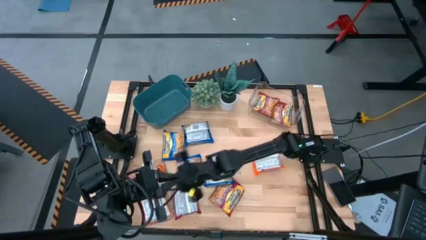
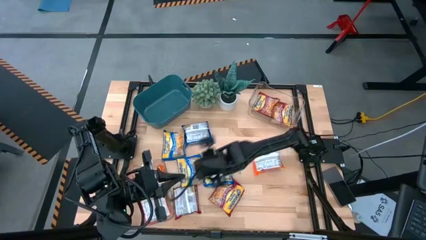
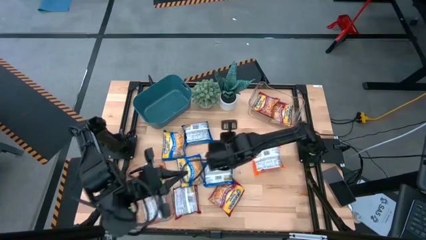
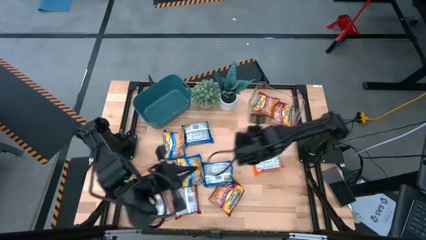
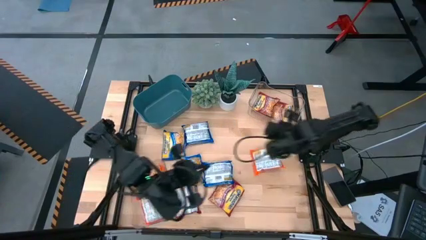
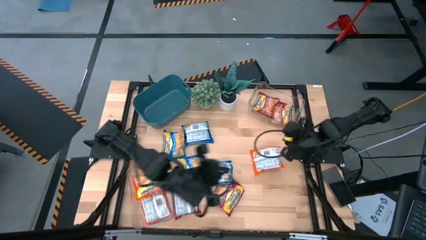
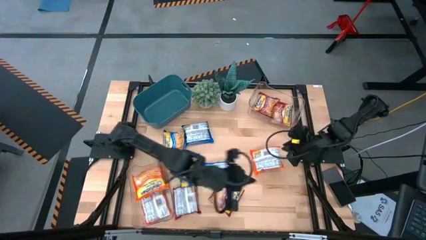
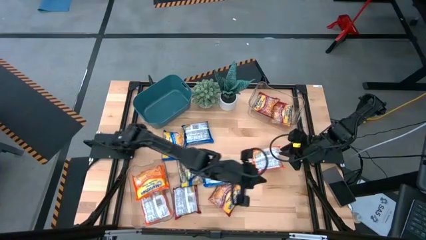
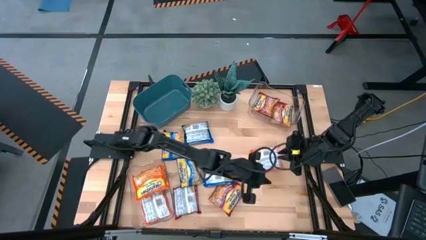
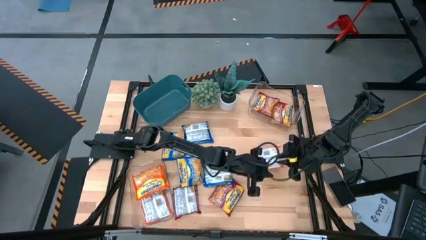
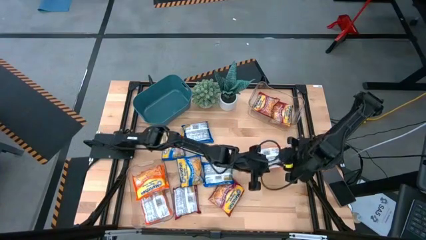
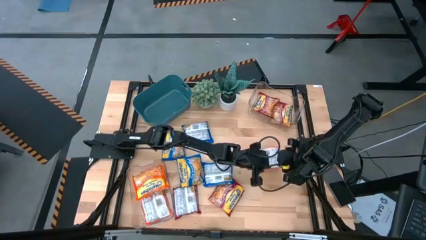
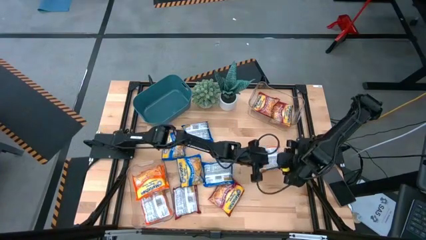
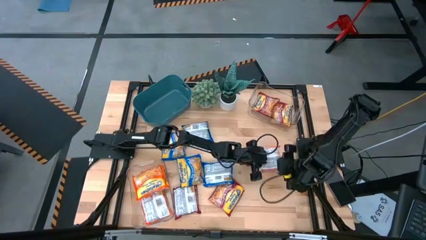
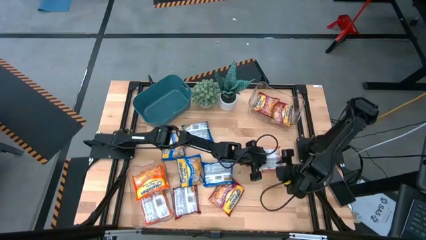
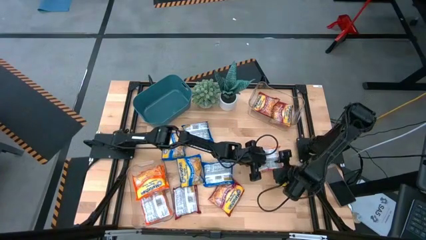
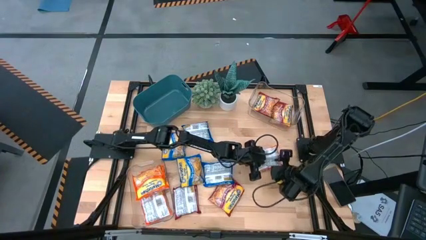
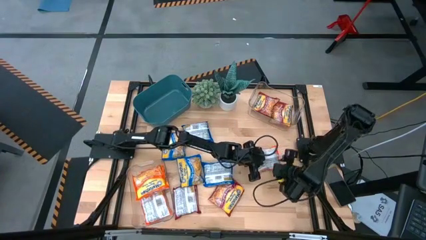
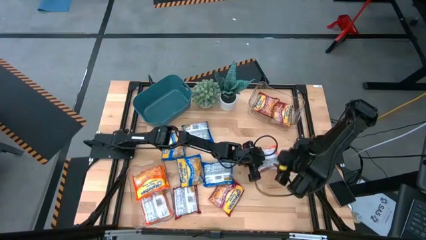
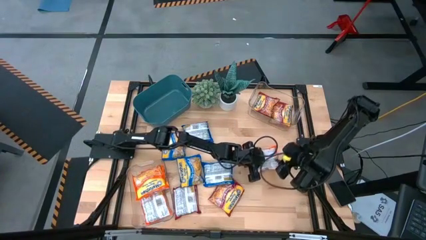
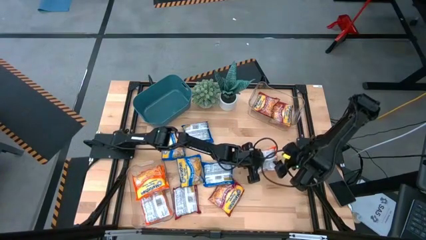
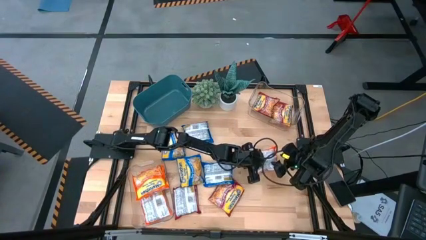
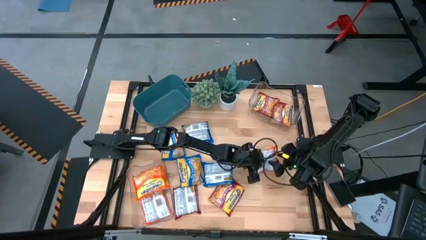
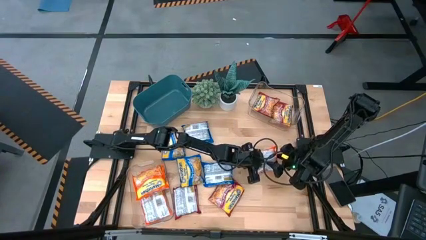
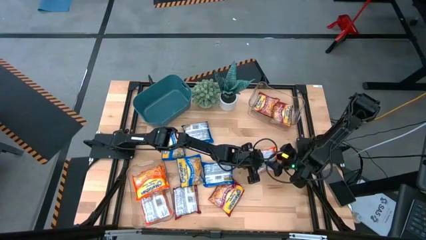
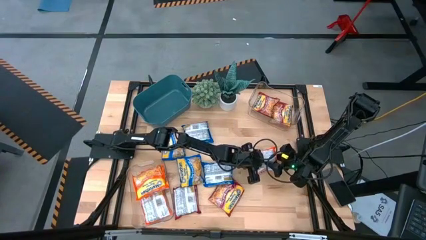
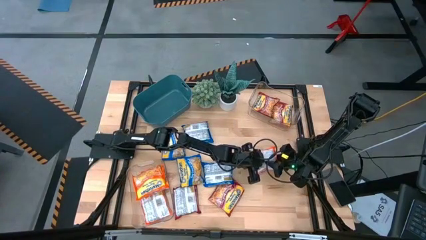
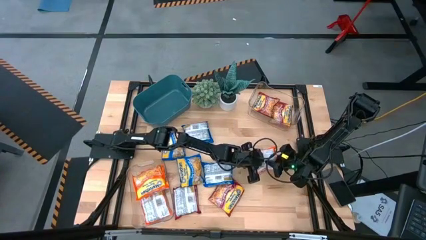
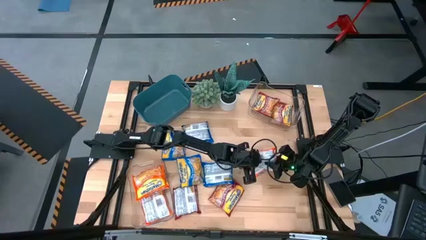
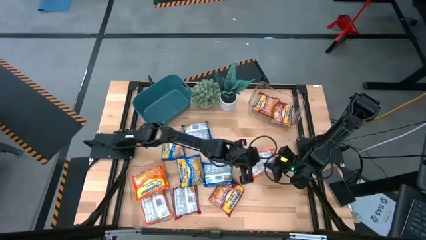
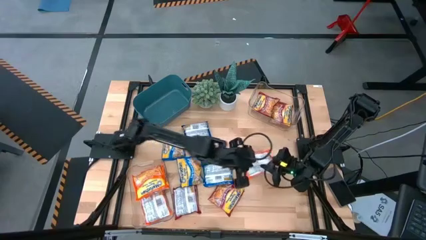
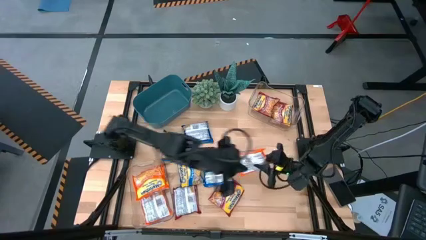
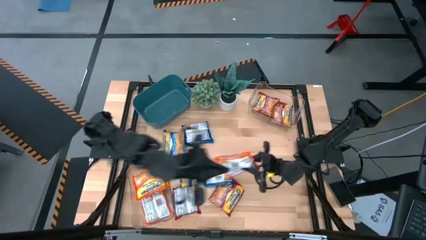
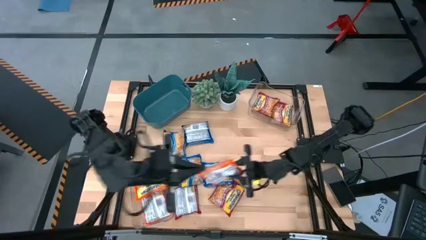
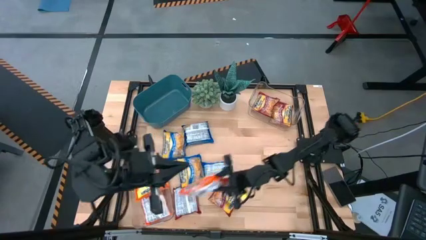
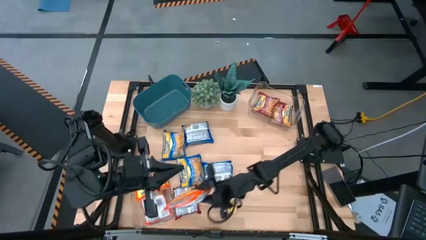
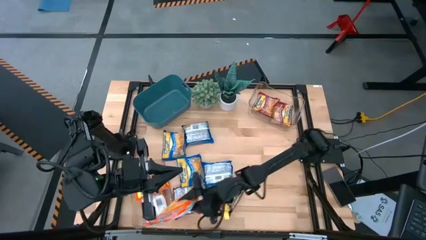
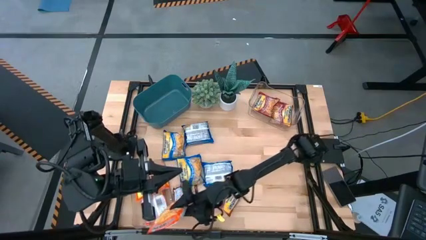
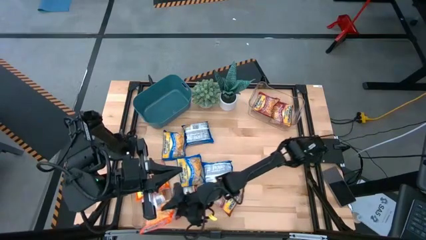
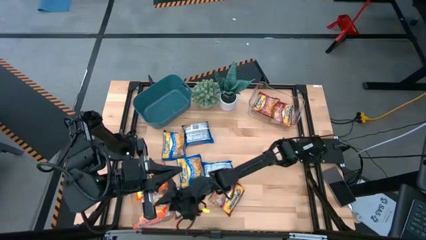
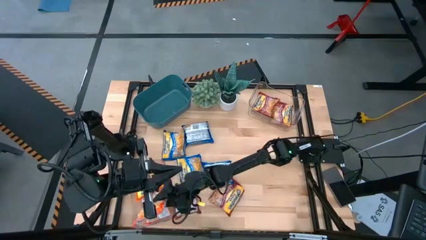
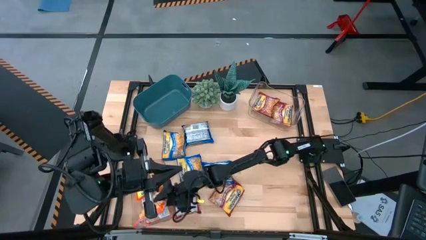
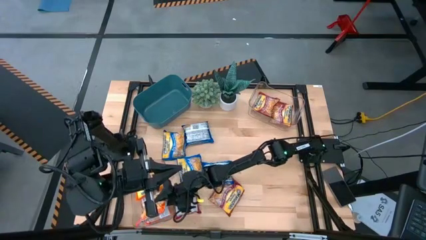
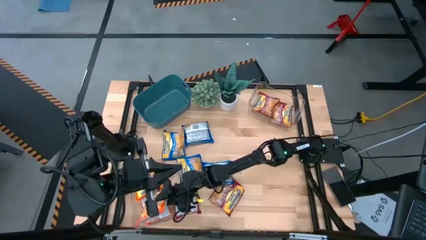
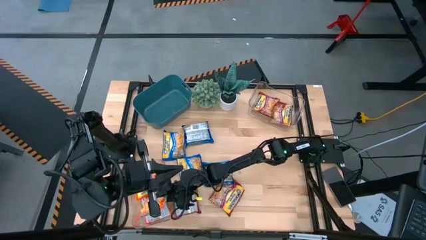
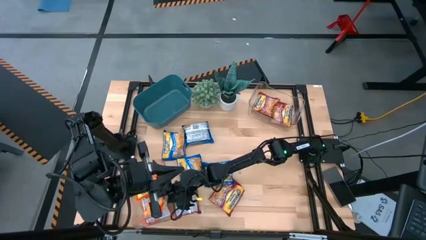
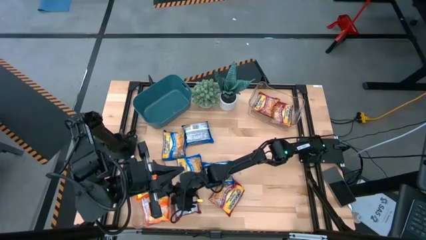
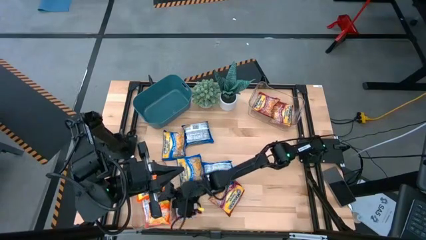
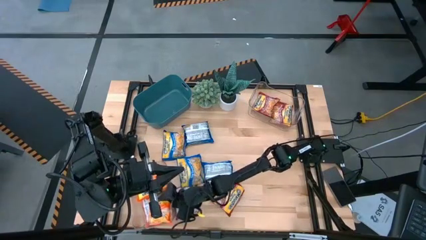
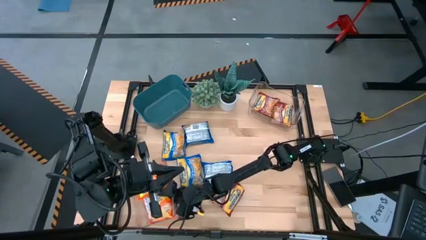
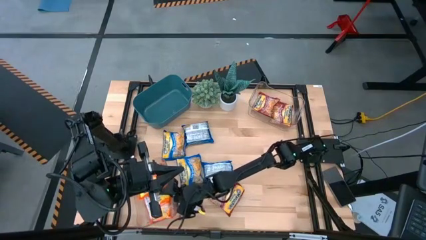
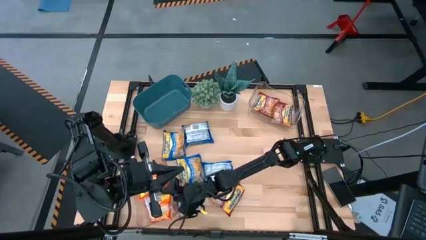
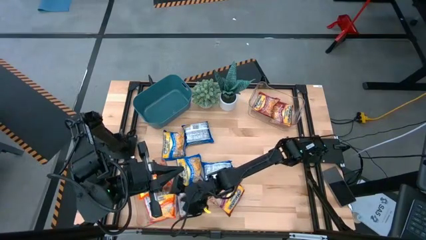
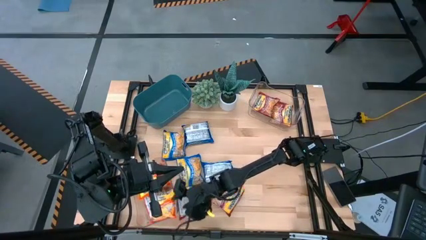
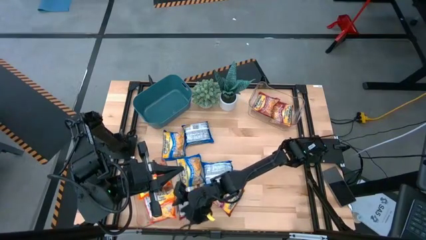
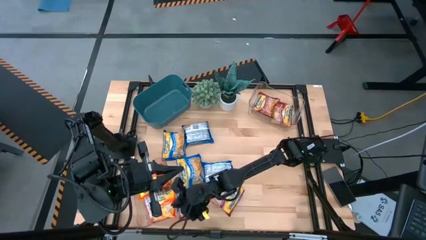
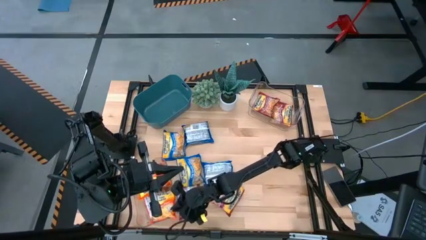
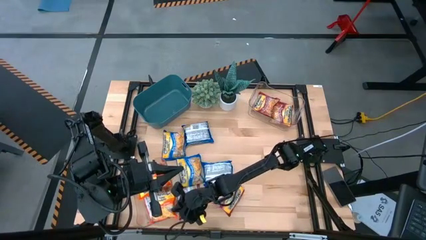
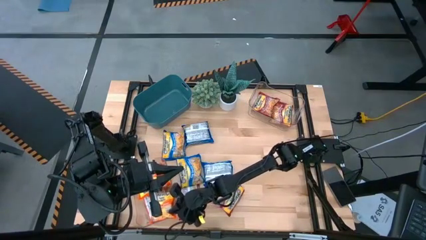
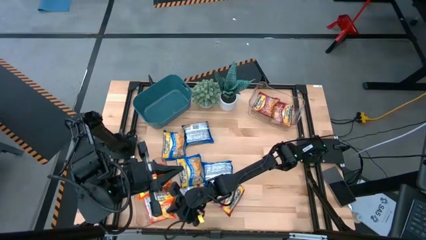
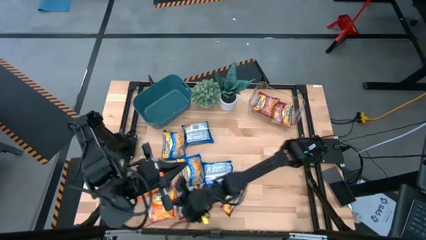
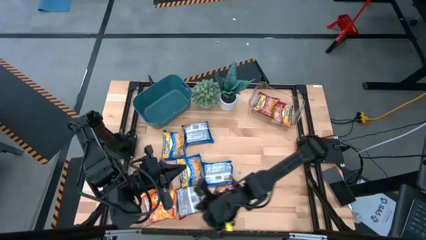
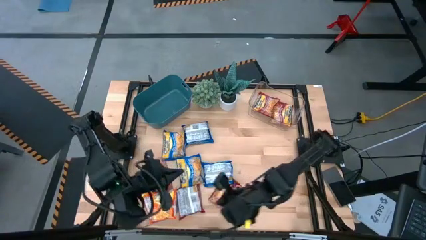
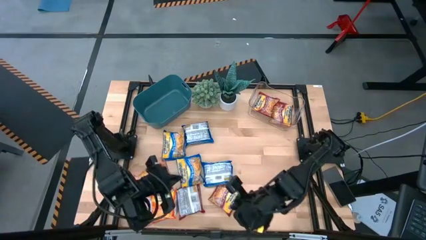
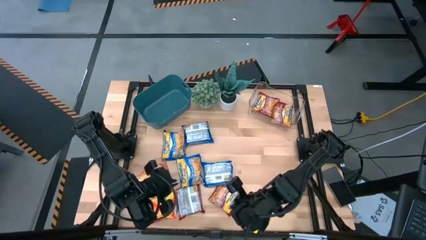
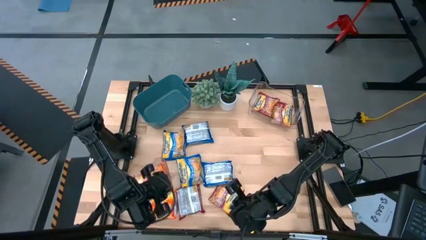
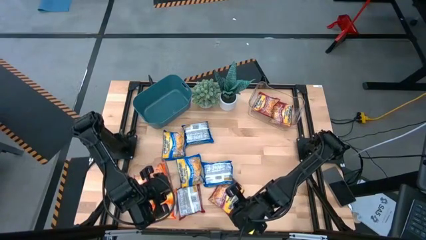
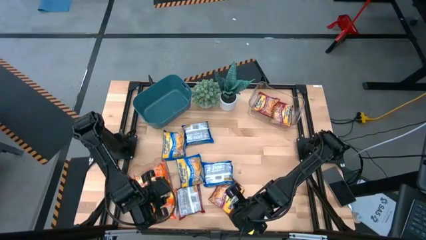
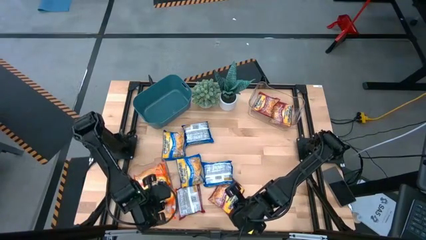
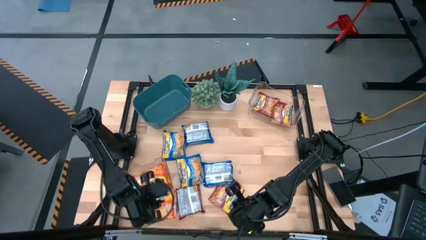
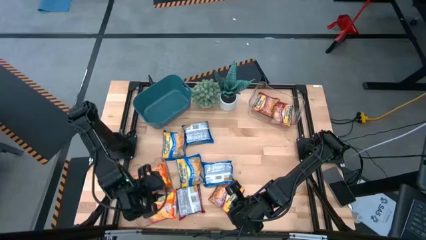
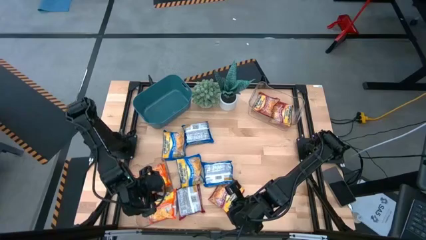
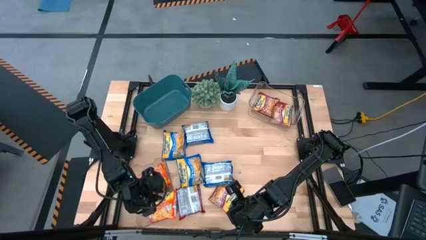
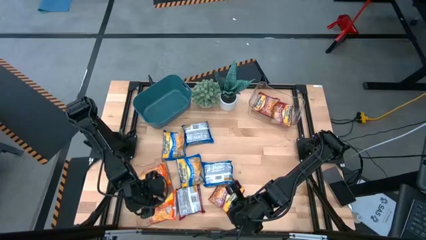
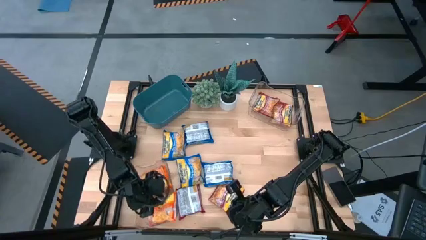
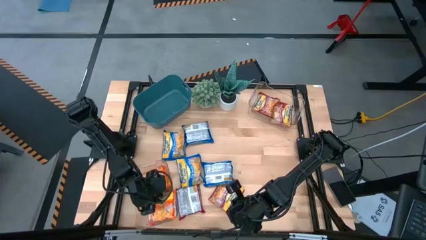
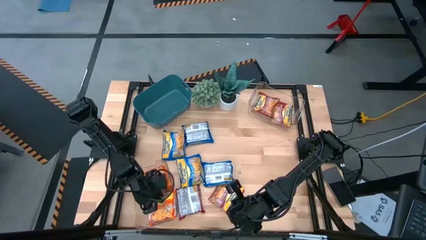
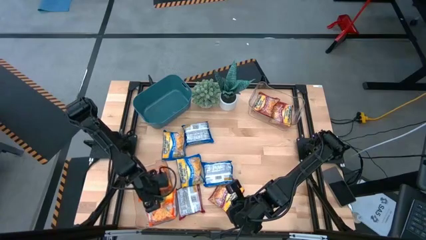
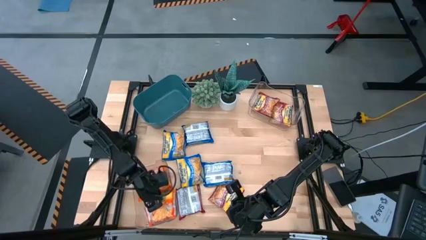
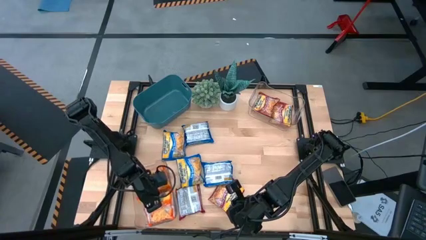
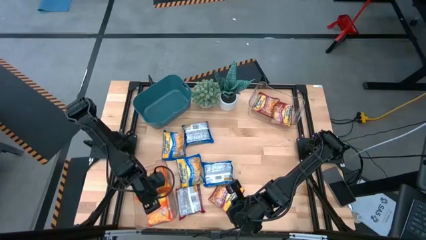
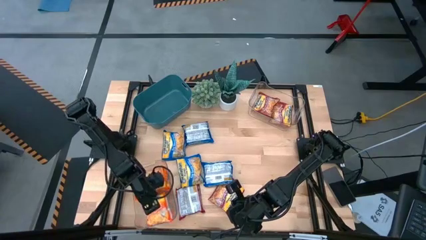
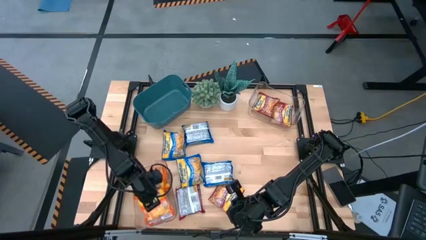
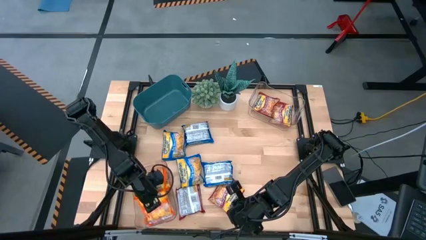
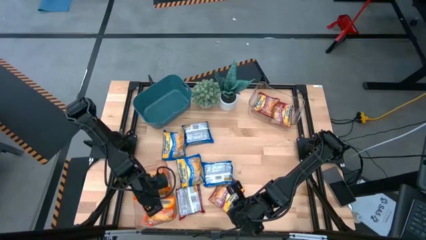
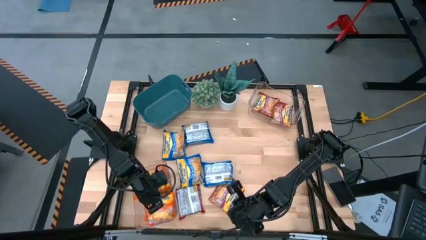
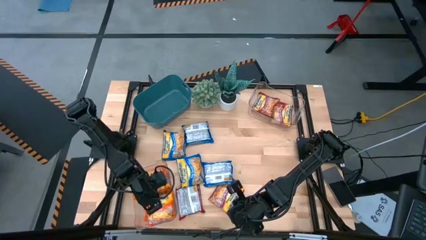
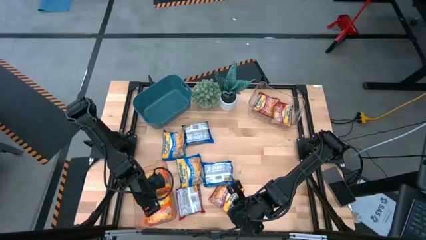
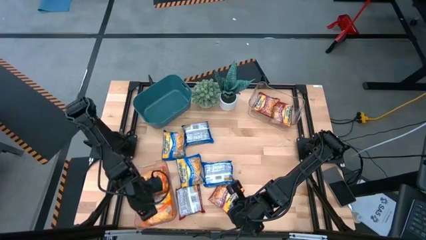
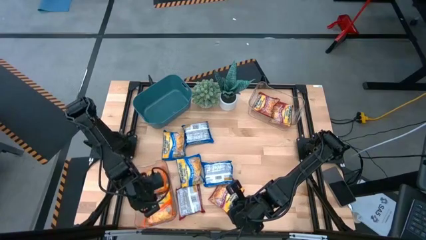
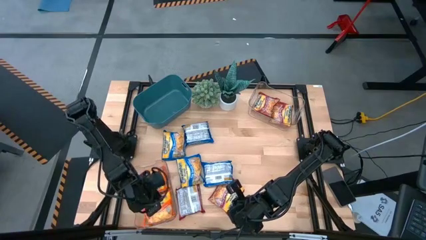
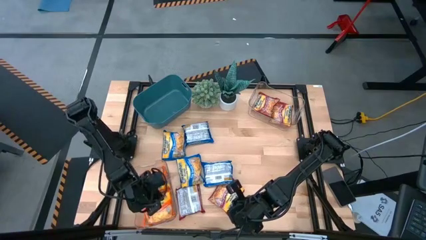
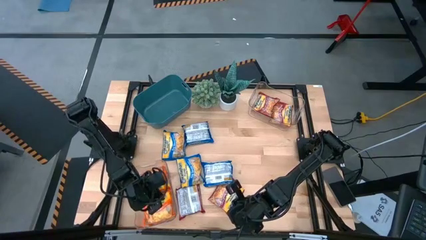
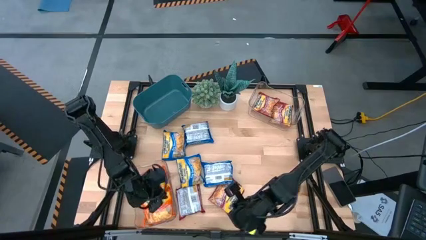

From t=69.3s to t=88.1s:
Task: Sort Maruchan noodles
Put the orange noodle pack into the bottom transparent bin
